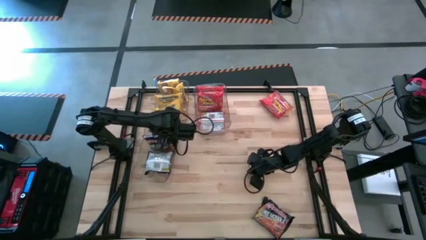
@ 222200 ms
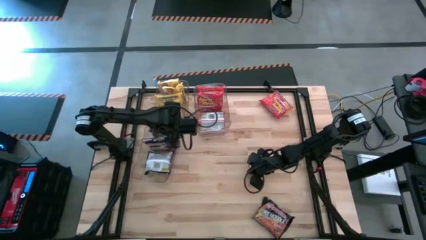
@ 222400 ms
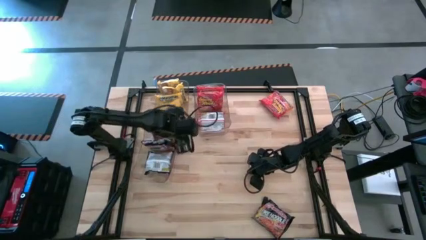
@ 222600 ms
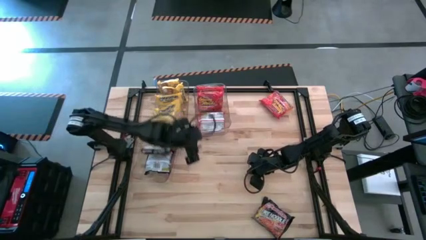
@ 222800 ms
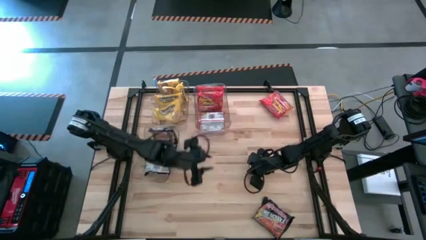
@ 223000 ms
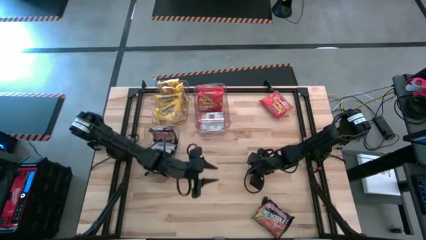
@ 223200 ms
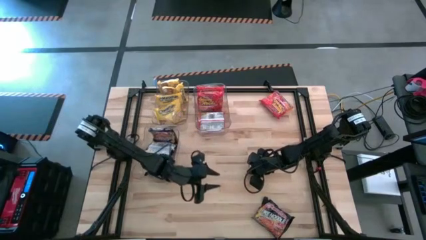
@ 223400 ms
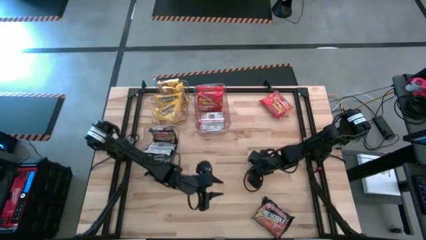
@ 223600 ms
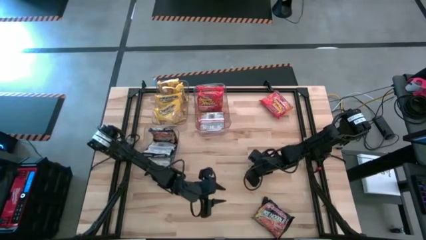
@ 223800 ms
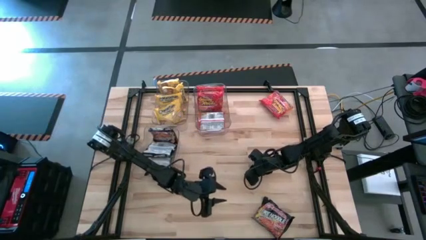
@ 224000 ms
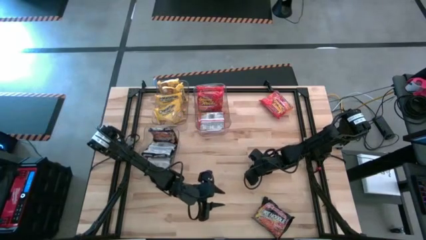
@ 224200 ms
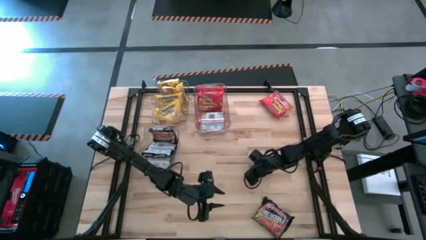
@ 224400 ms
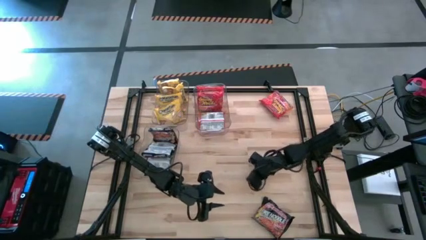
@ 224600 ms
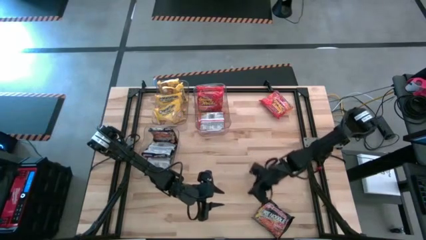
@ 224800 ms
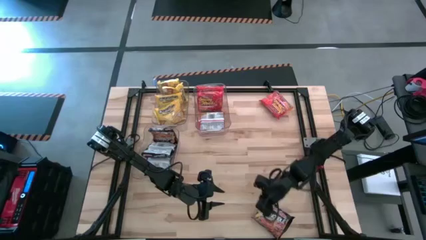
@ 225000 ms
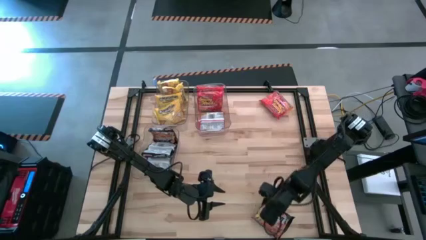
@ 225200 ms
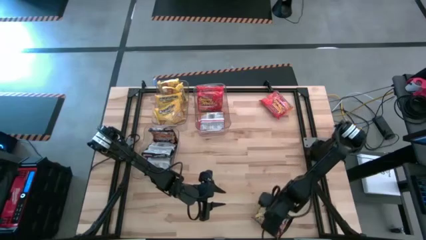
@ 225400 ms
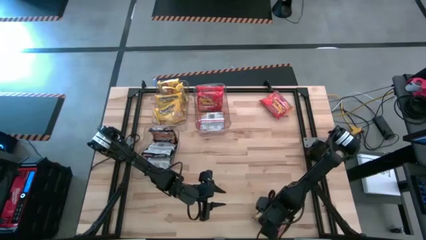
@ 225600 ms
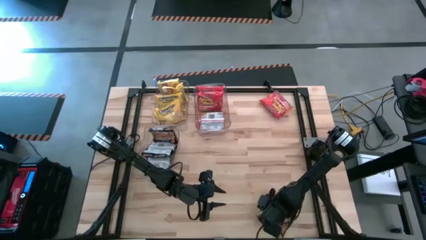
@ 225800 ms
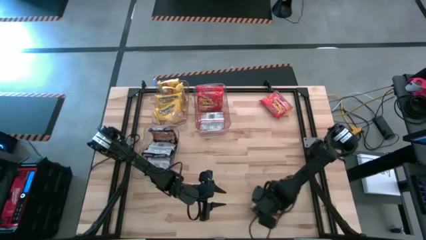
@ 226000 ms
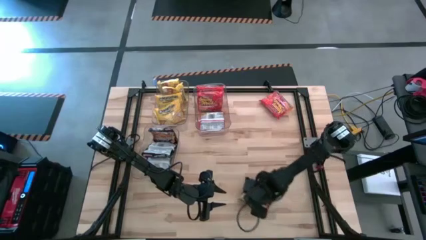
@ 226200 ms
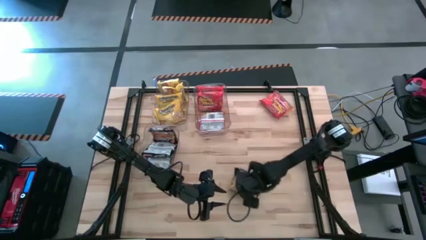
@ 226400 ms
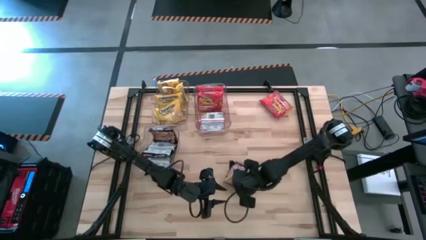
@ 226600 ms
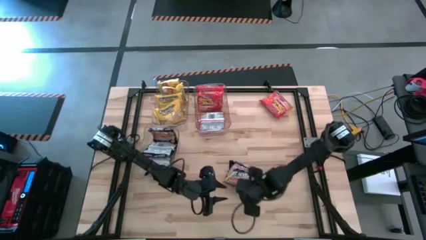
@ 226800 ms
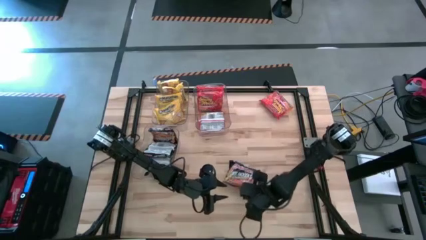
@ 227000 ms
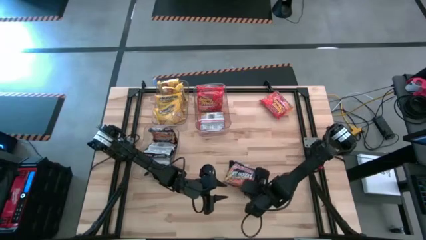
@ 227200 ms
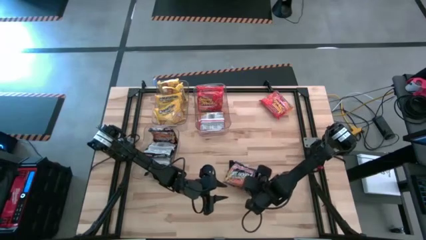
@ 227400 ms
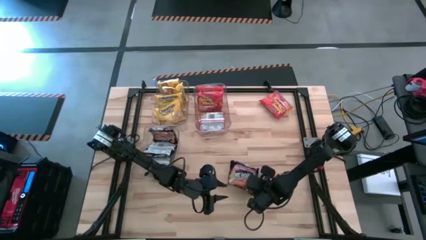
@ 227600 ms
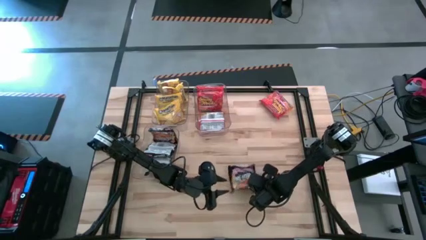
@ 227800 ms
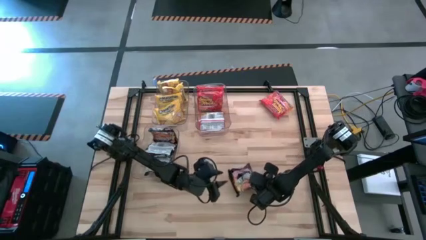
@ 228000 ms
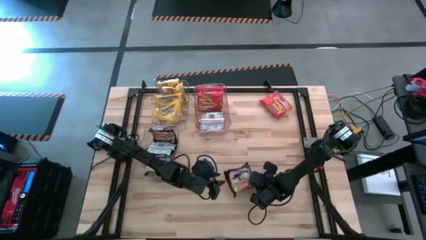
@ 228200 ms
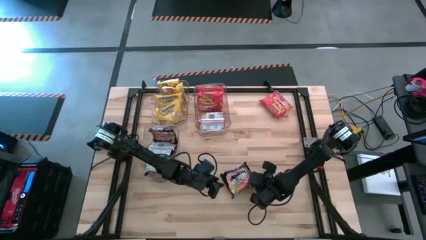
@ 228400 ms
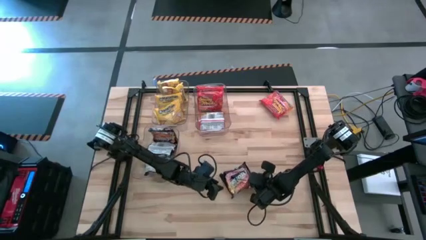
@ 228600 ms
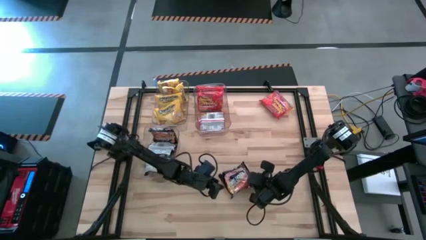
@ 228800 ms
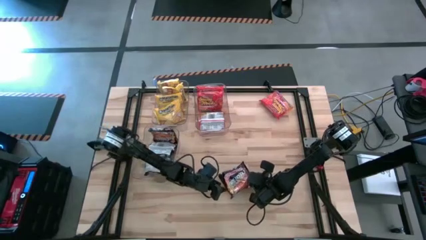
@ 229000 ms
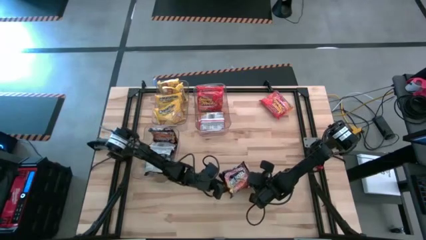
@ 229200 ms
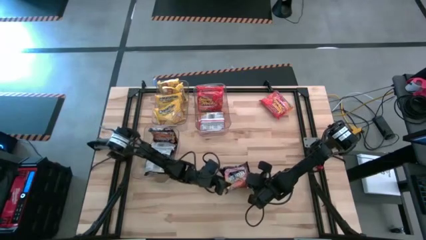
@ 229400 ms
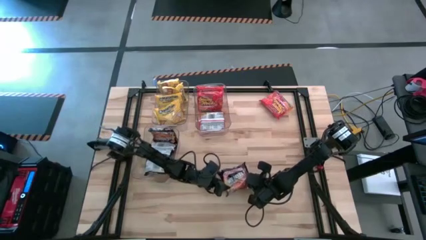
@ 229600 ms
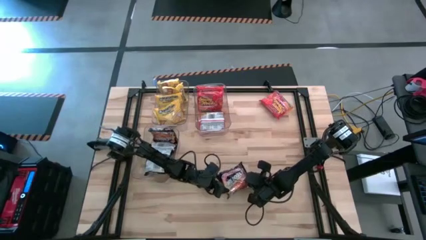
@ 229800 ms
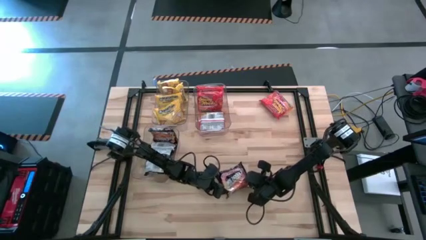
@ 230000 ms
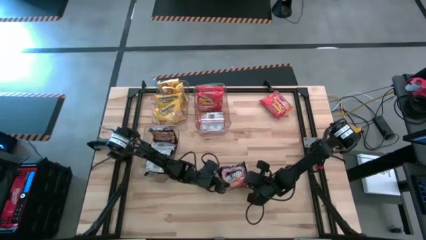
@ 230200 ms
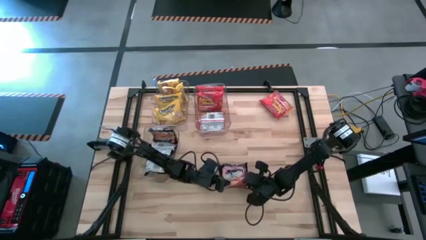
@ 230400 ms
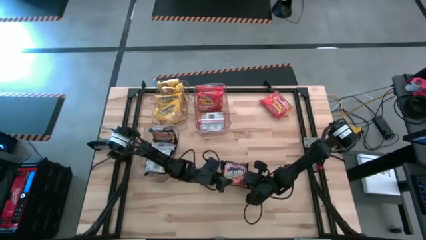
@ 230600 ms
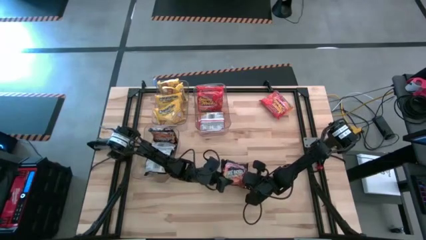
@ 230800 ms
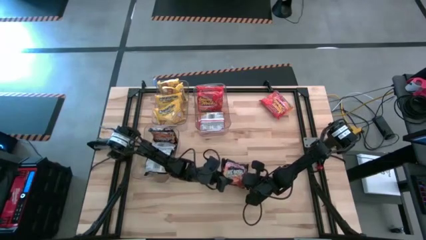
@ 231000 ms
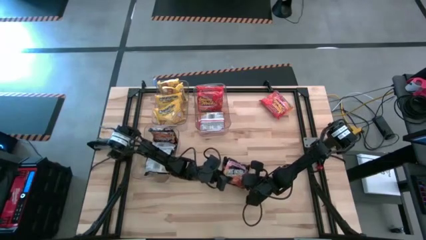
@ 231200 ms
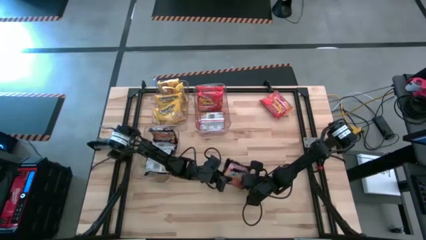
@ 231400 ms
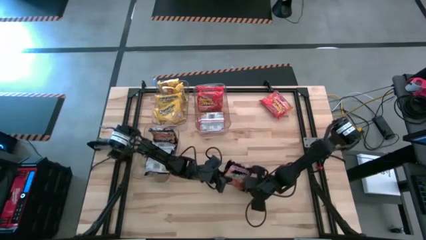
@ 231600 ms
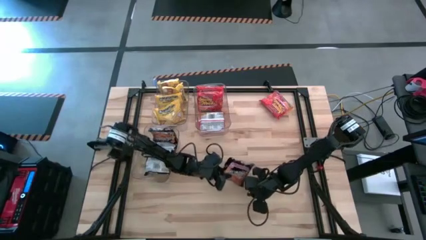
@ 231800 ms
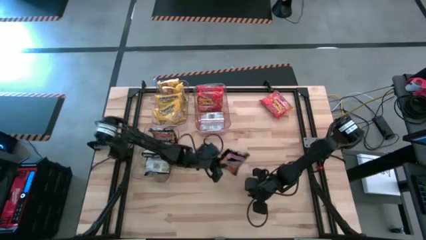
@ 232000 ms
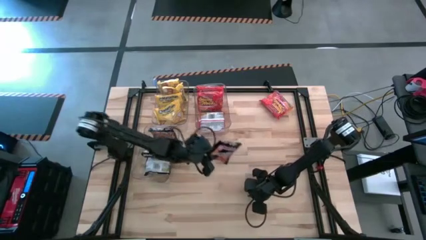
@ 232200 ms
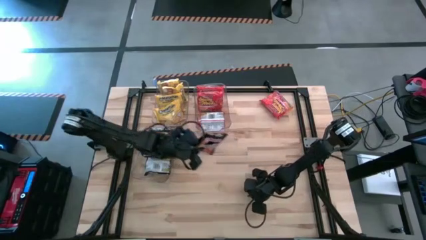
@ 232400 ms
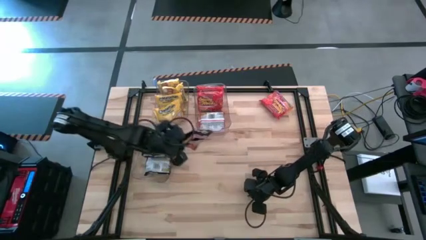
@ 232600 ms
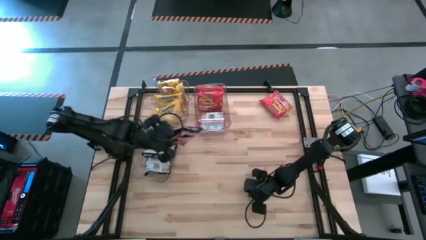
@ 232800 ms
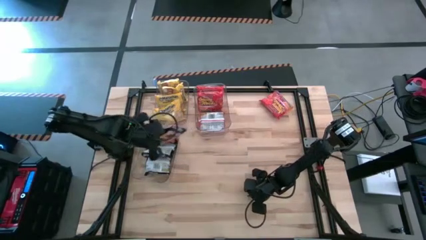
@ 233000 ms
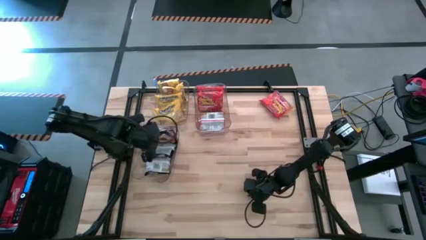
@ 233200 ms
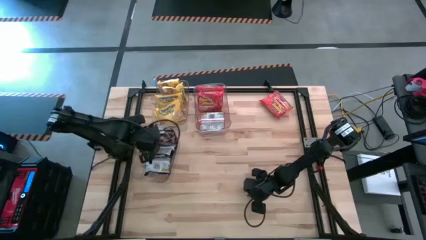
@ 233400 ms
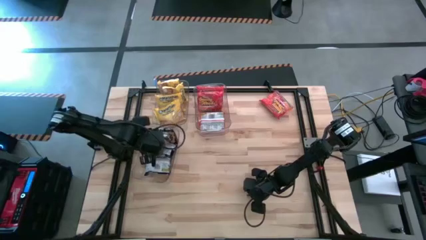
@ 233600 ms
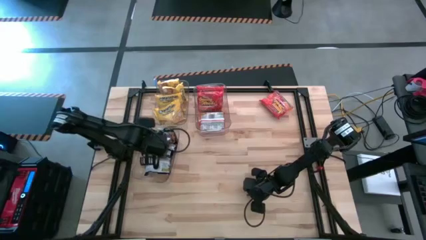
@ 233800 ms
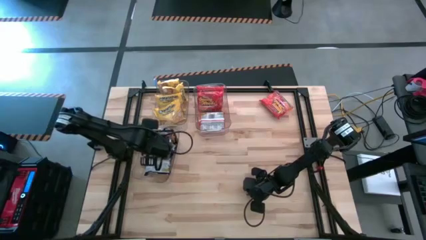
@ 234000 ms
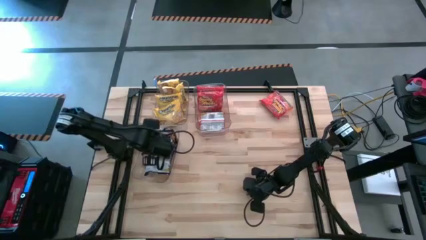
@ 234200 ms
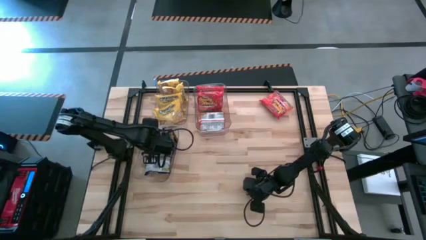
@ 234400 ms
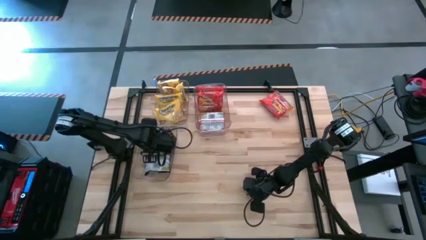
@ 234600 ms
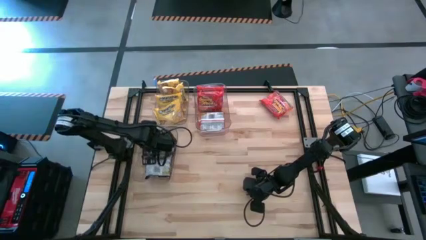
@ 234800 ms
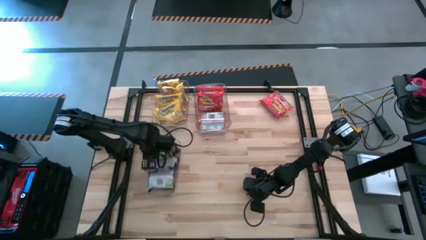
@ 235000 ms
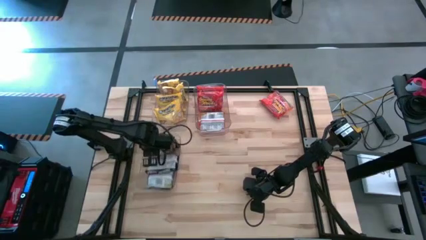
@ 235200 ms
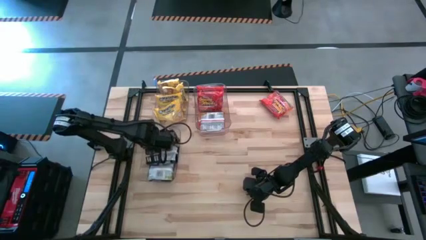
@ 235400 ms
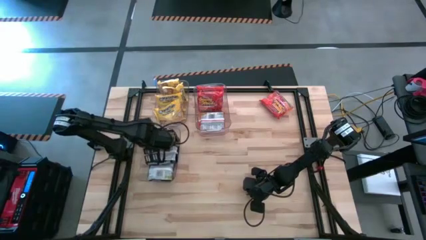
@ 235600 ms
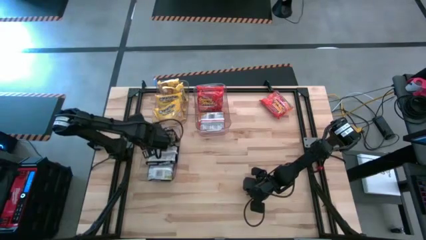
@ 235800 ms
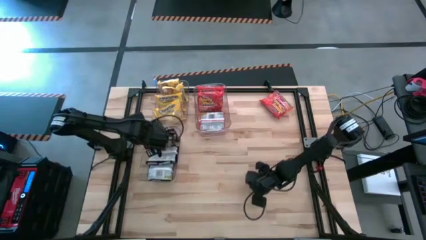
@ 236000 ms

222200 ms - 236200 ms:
Task: Sort Maruchan noodles
Put the black noodle pack into the bottom transparent bin

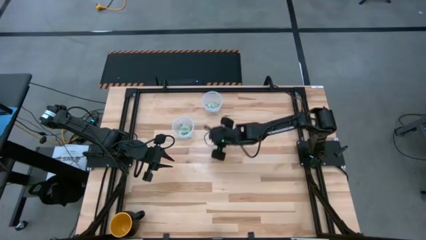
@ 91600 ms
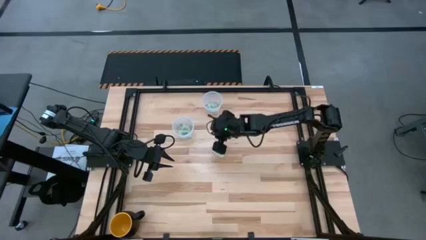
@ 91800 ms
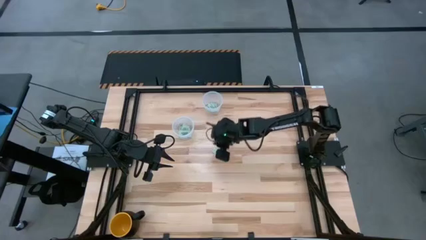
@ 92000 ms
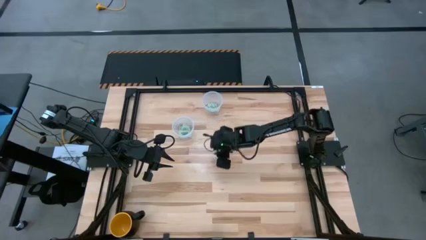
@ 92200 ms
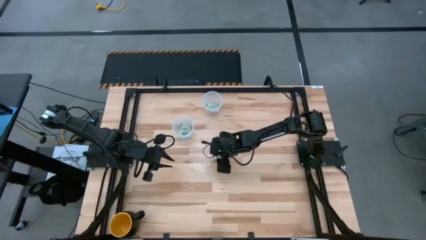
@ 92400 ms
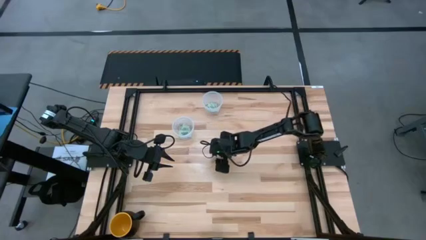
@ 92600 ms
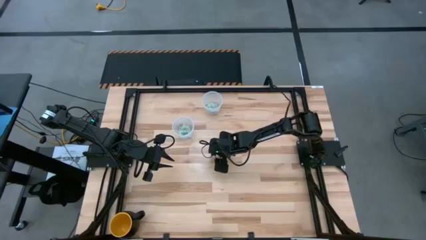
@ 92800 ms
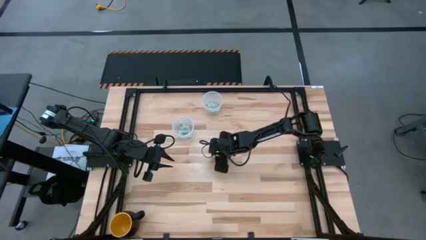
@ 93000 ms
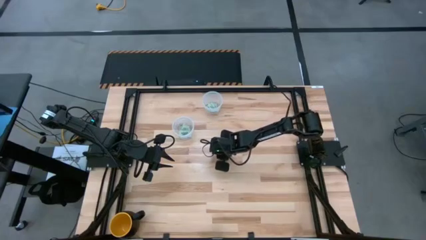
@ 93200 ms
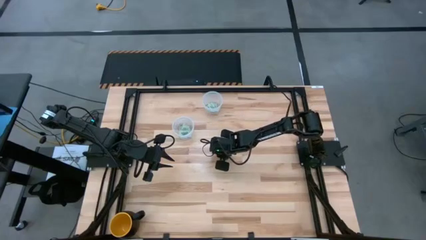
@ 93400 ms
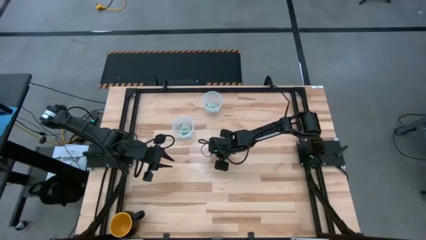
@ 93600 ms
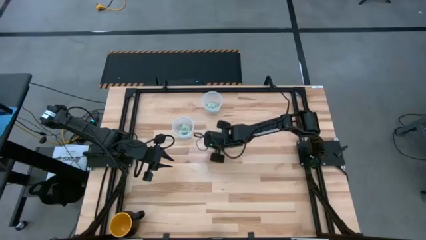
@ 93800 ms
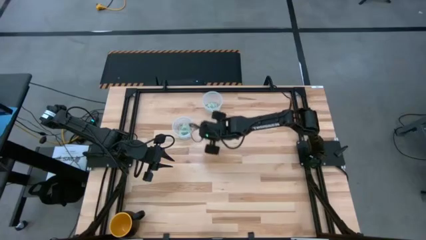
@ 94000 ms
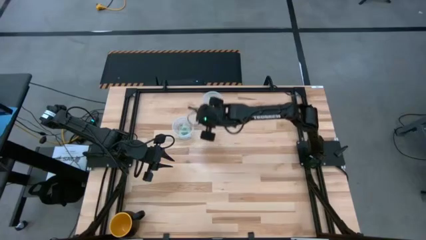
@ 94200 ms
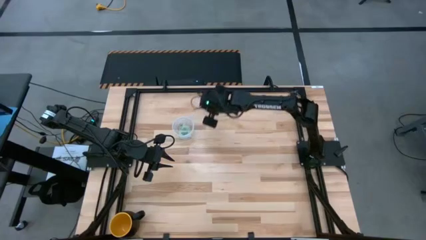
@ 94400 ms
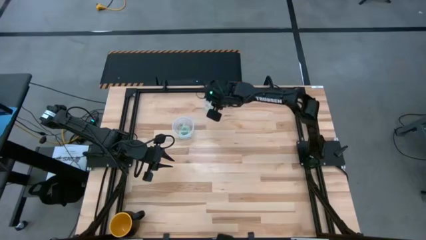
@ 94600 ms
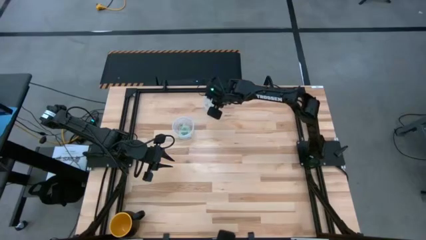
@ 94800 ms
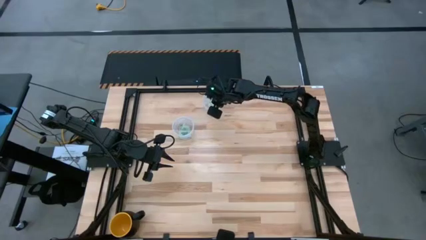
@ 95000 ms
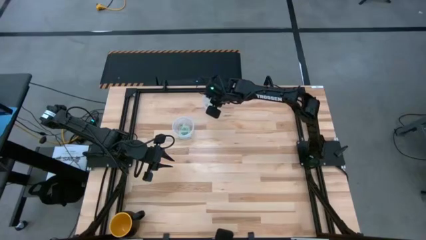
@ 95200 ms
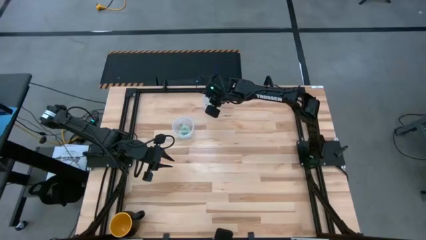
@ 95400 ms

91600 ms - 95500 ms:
Task: Pick and place items into bin
Put the stevia packet into the top transparent bin
